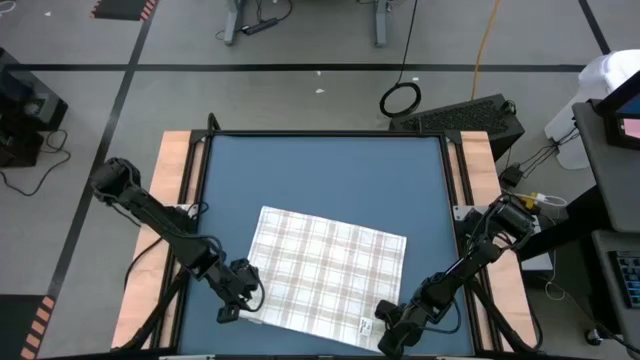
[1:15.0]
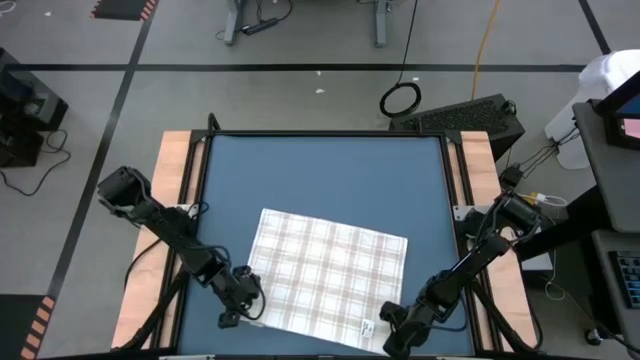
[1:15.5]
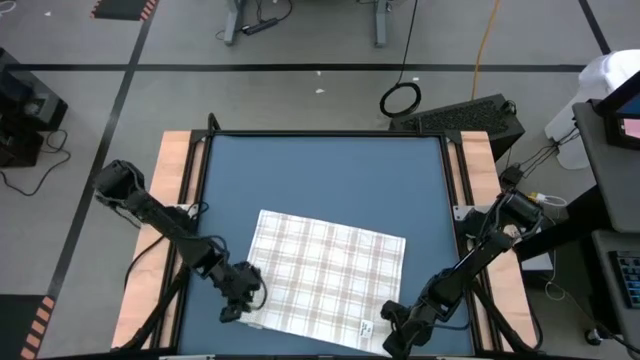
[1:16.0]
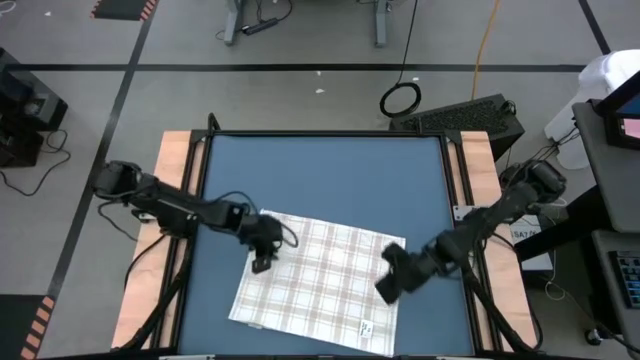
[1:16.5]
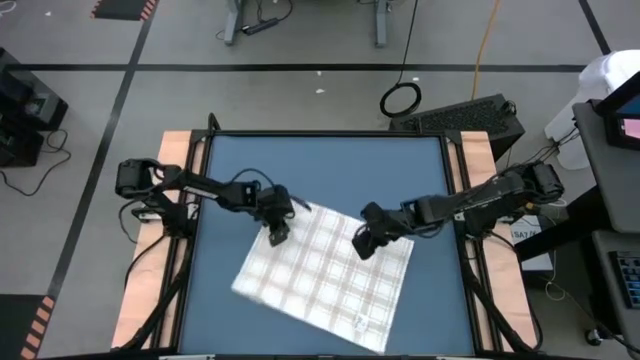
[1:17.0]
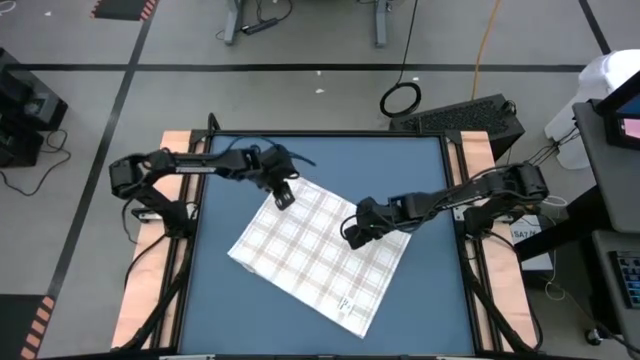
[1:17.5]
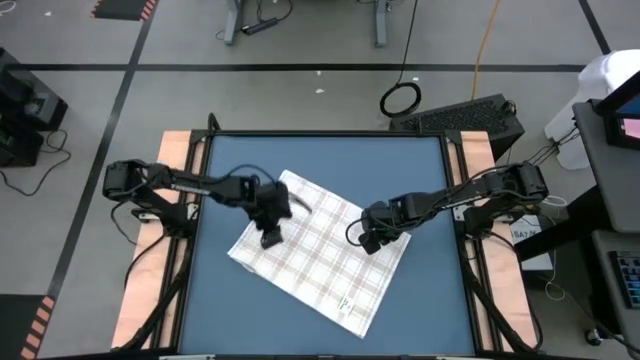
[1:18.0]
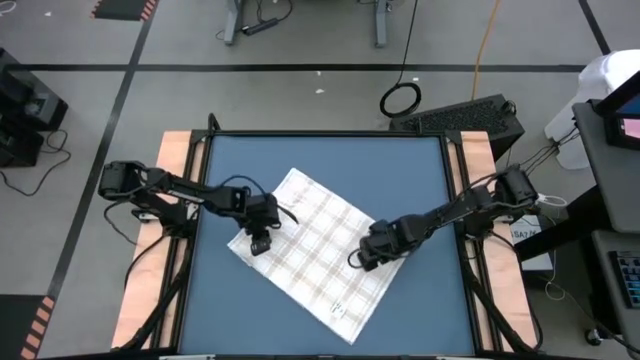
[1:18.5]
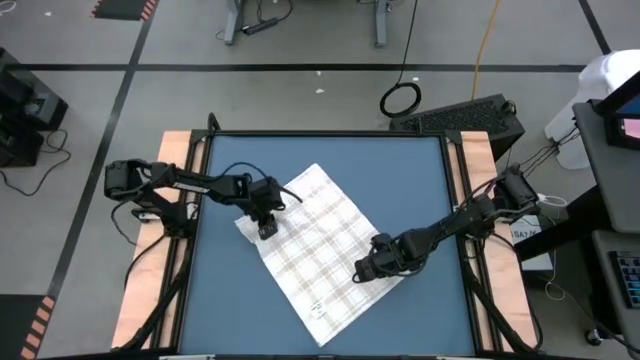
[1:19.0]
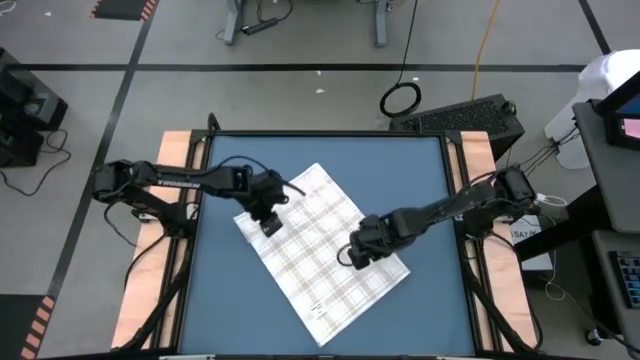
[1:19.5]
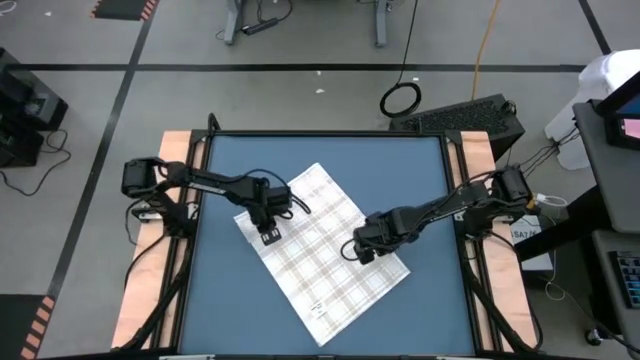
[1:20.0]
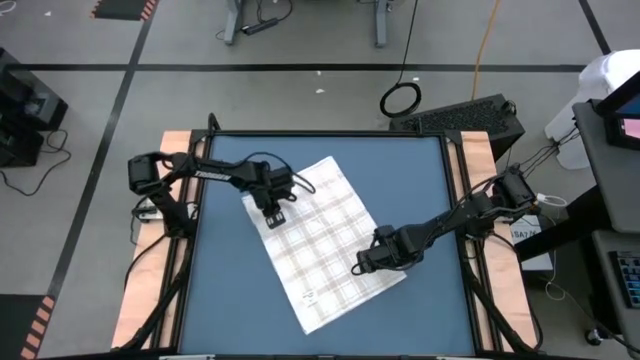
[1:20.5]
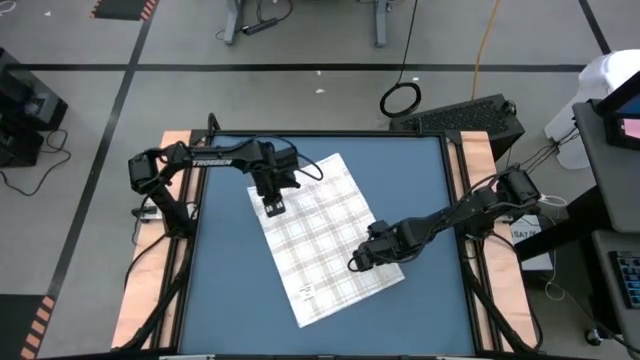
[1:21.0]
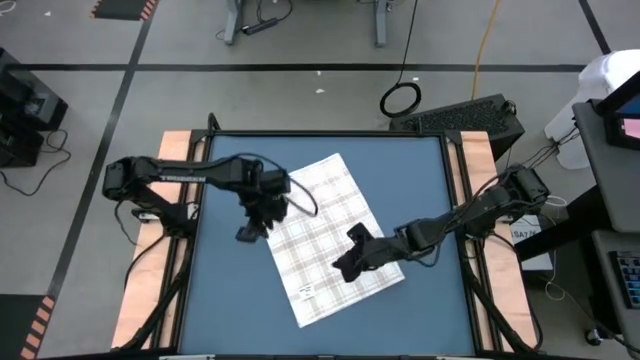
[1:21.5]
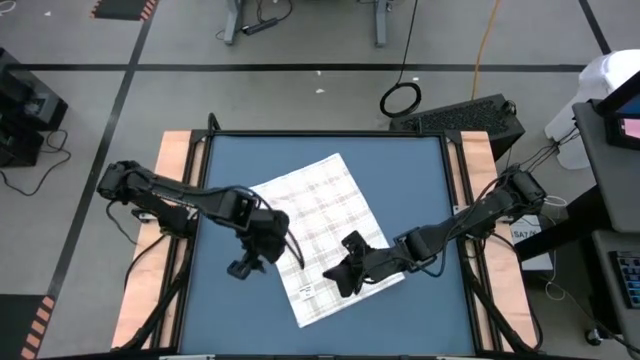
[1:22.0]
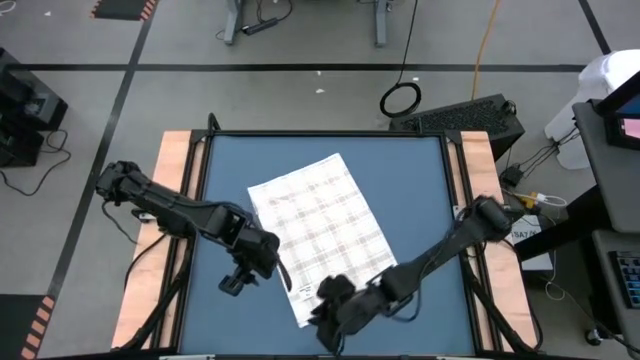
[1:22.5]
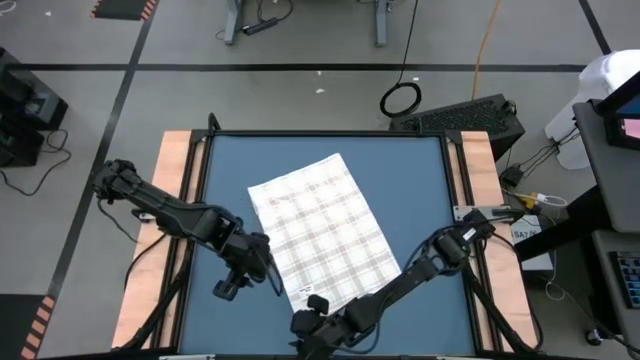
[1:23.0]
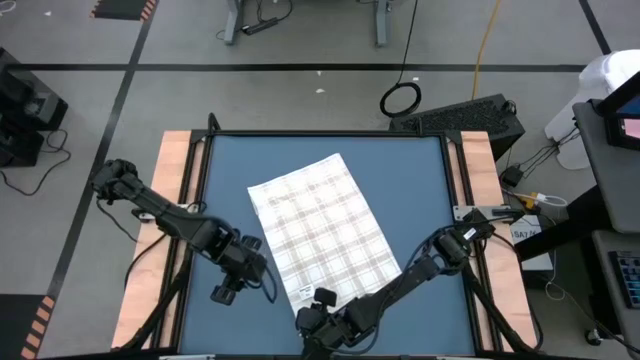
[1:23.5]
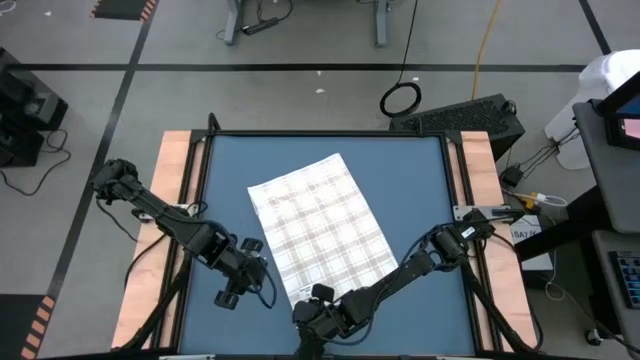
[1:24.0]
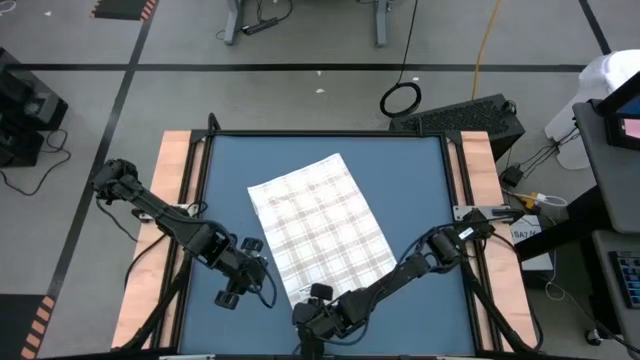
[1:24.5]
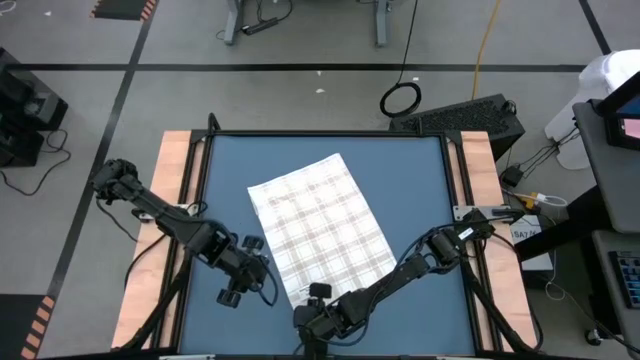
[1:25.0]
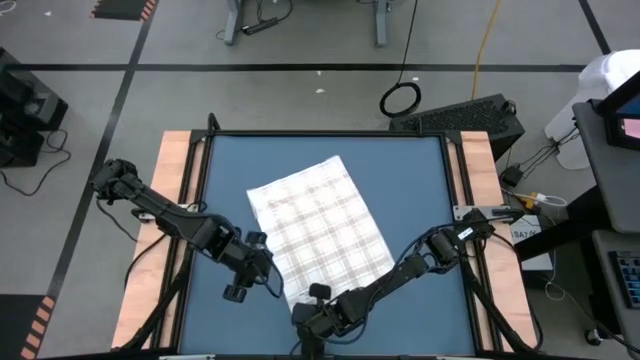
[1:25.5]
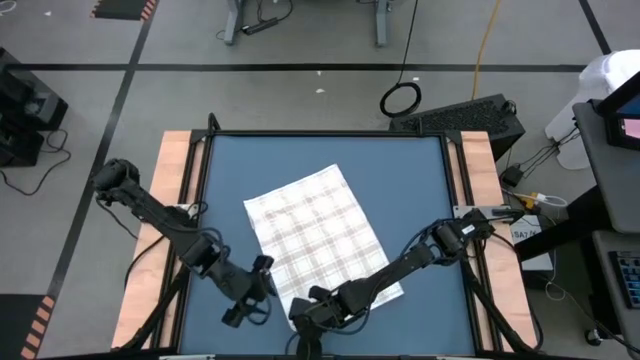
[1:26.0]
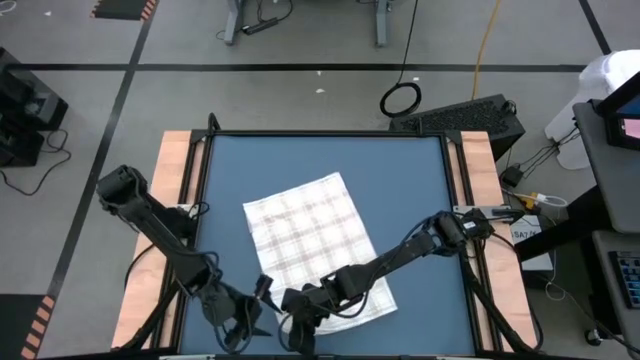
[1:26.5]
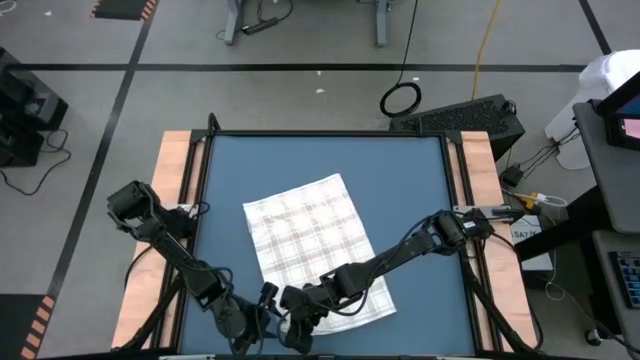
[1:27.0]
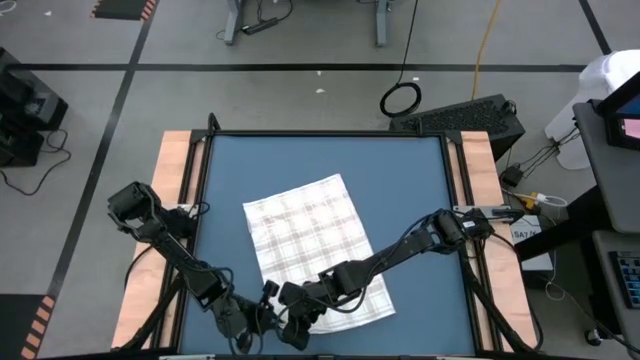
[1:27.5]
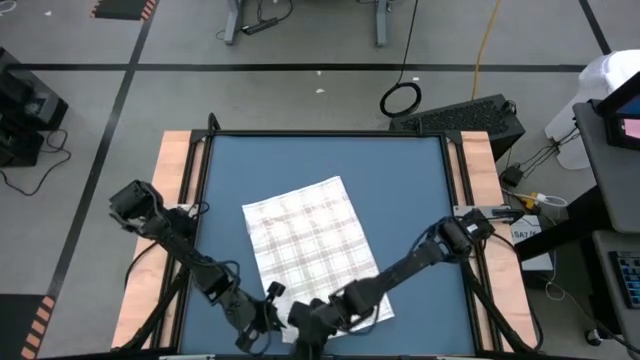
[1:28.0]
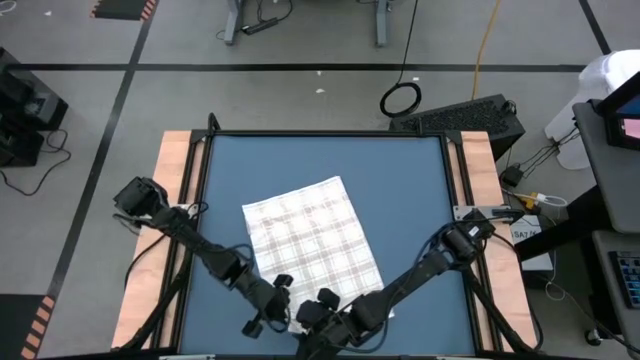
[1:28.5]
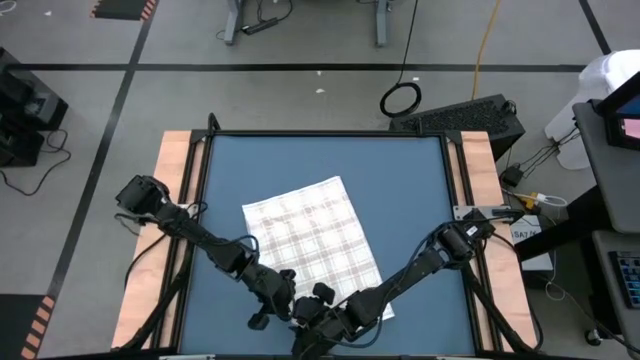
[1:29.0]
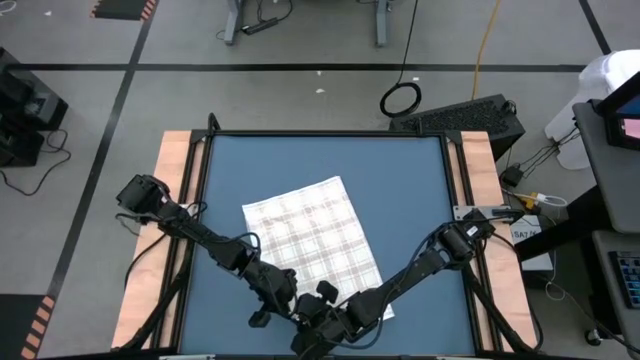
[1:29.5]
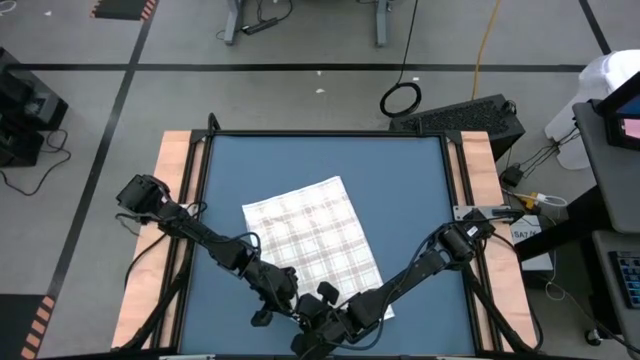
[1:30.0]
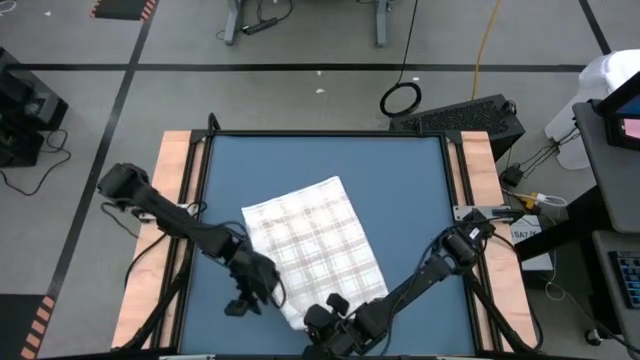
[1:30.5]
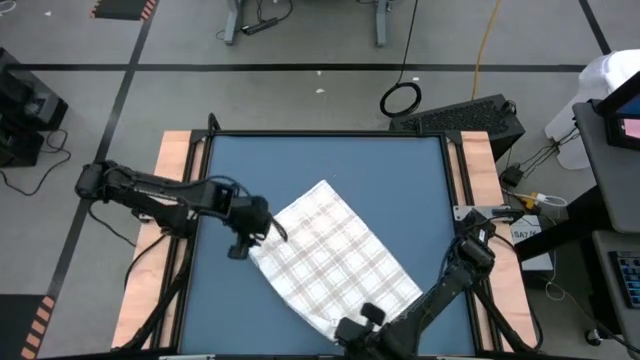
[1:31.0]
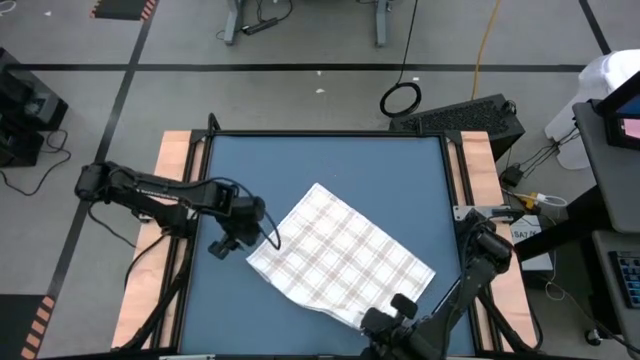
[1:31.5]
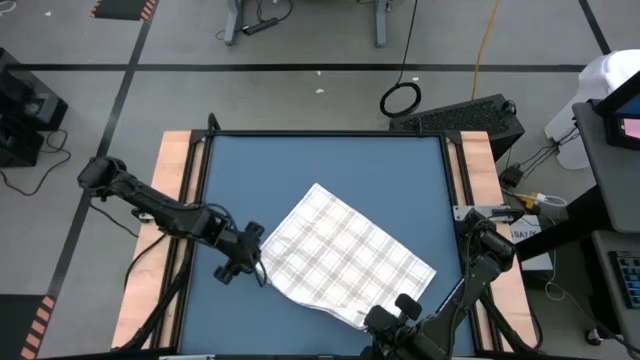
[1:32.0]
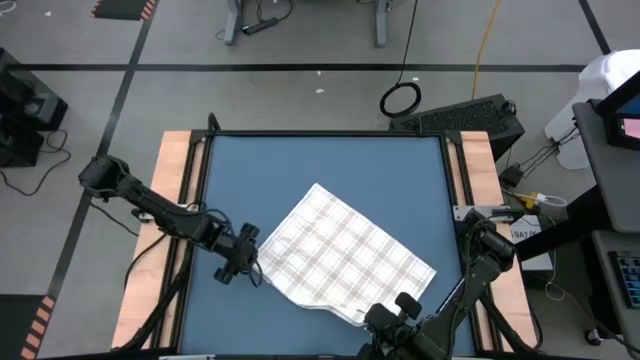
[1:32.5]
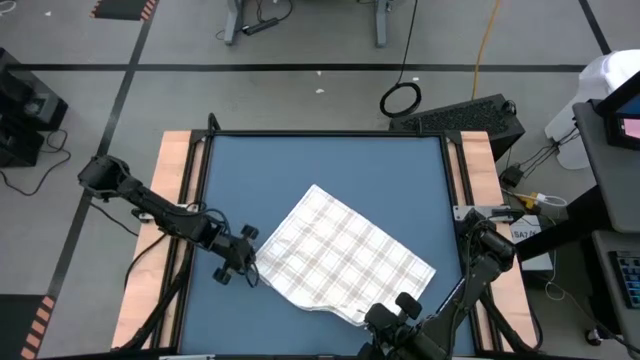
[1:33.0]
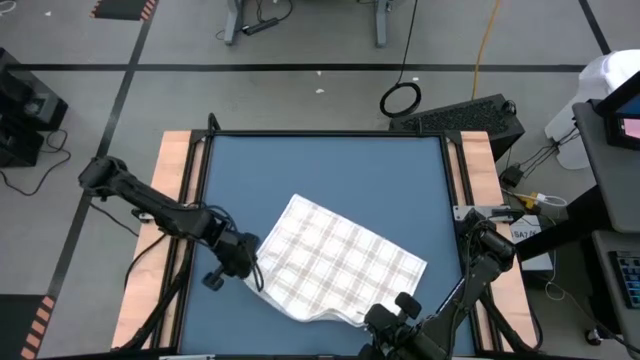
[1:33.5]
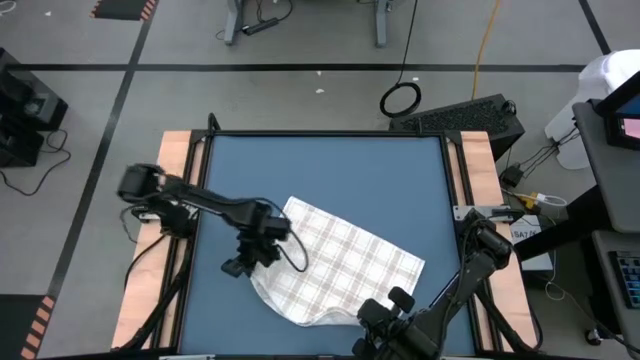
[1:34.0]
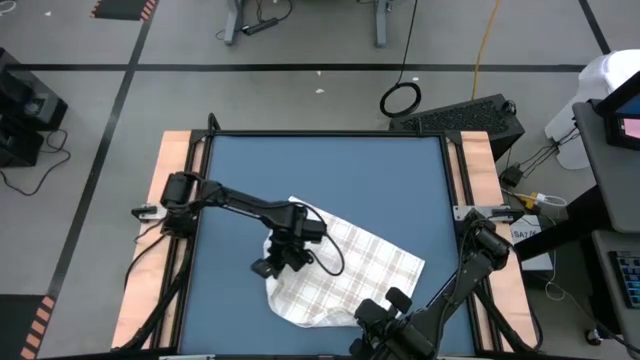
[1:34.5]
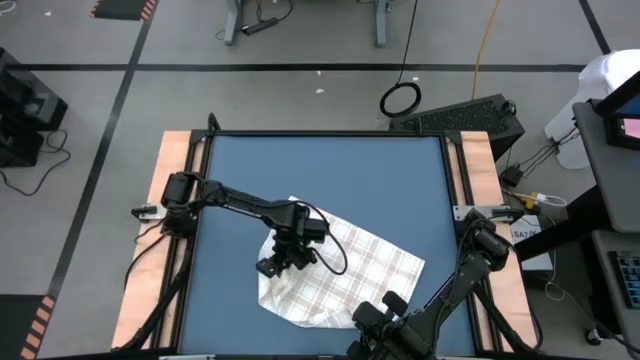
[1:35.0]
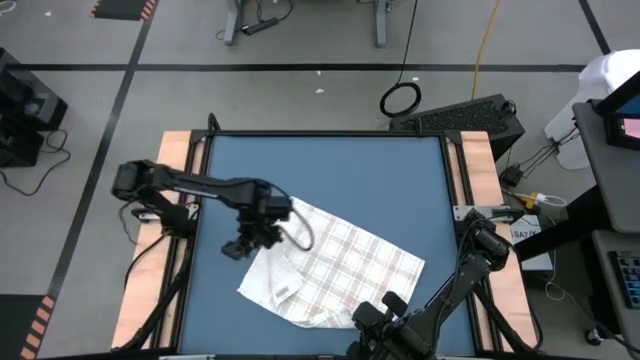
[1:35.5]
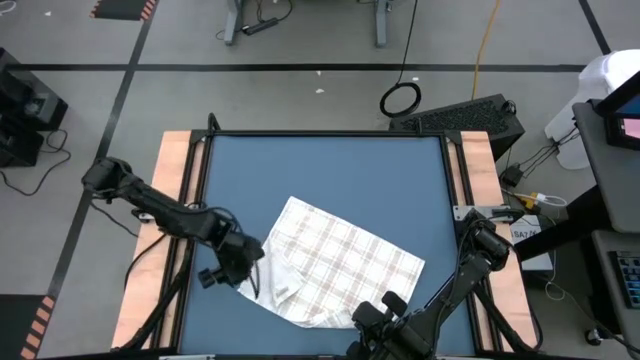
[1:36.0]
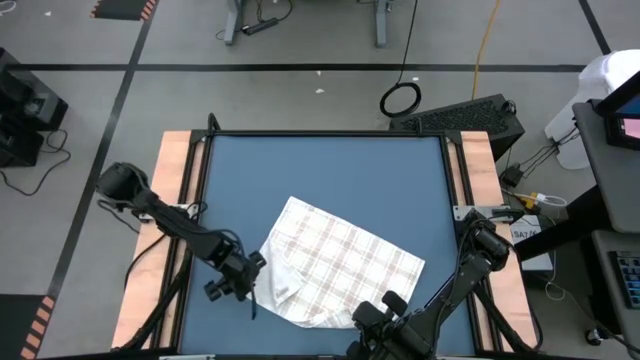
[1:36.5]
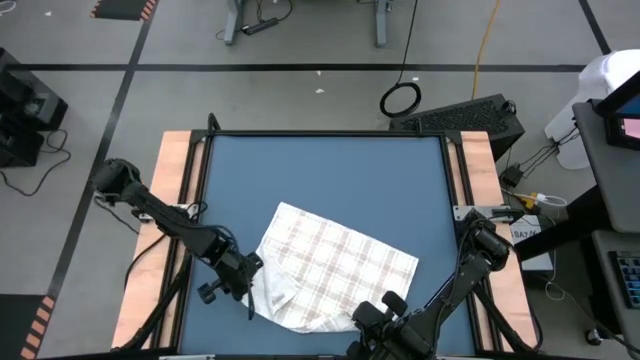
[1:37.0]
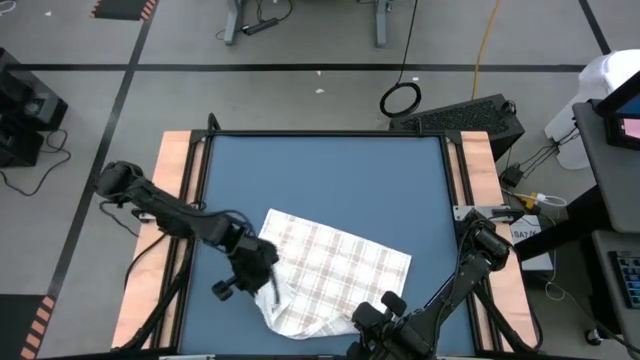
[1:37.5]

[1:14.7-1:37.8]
Task: Roll towel
Fold the white towel
